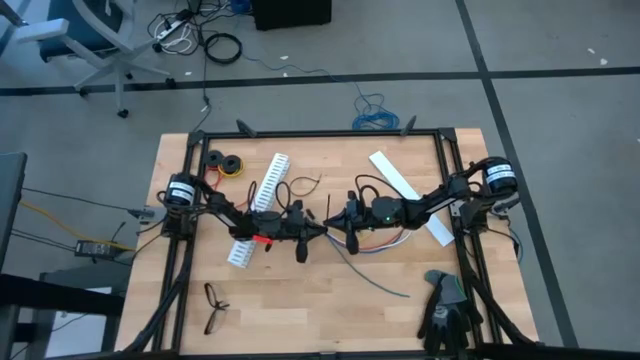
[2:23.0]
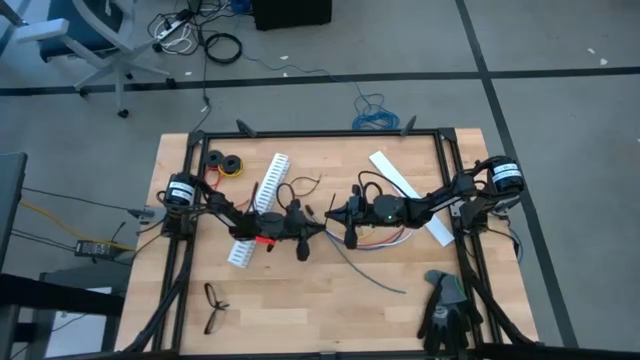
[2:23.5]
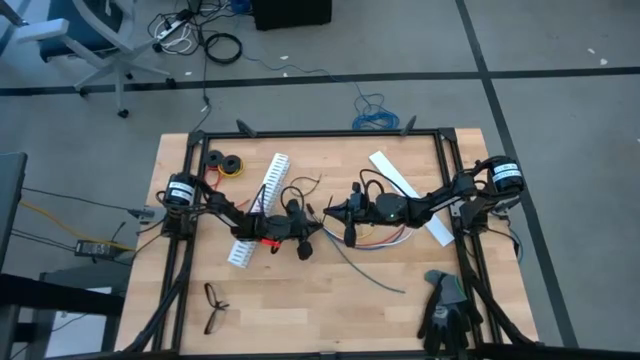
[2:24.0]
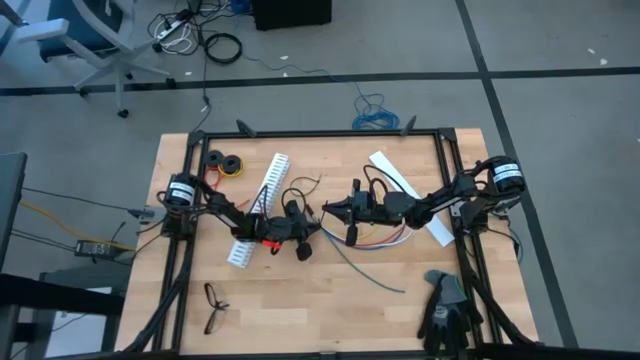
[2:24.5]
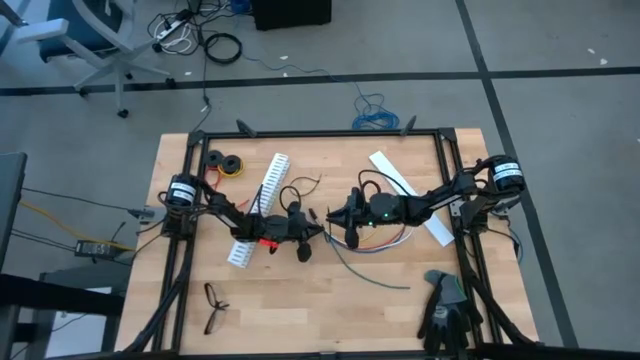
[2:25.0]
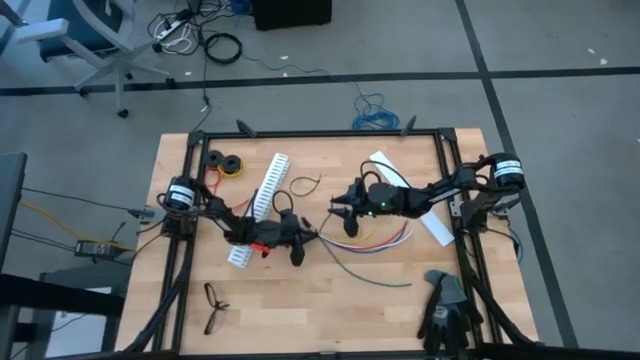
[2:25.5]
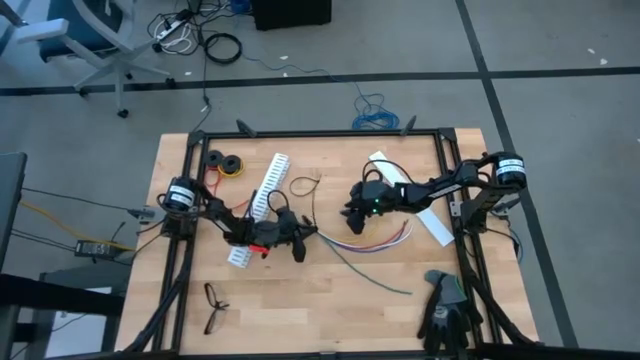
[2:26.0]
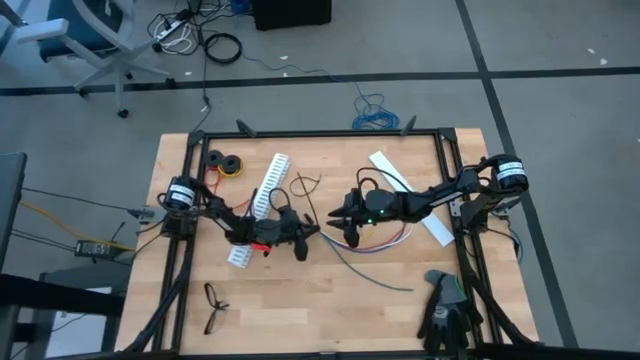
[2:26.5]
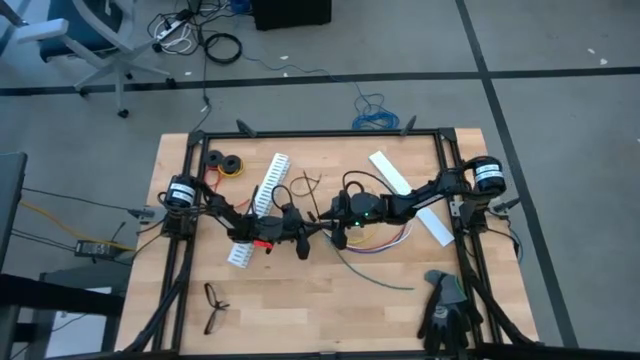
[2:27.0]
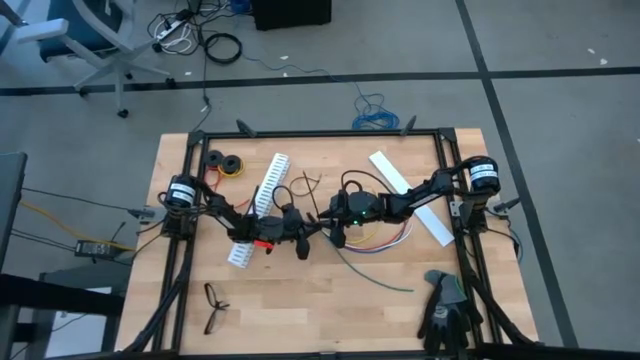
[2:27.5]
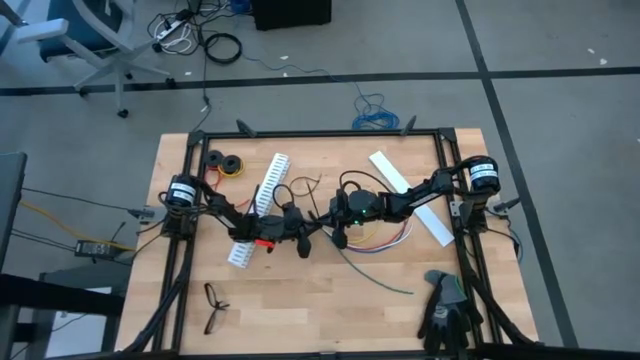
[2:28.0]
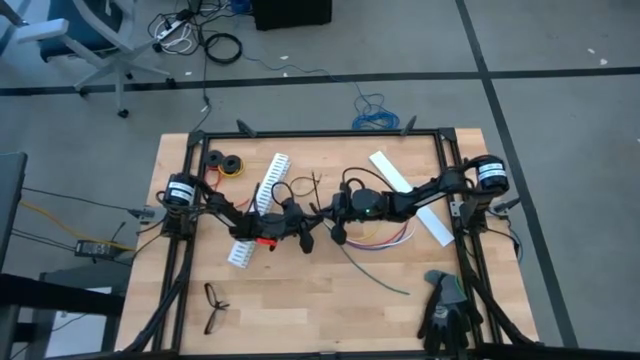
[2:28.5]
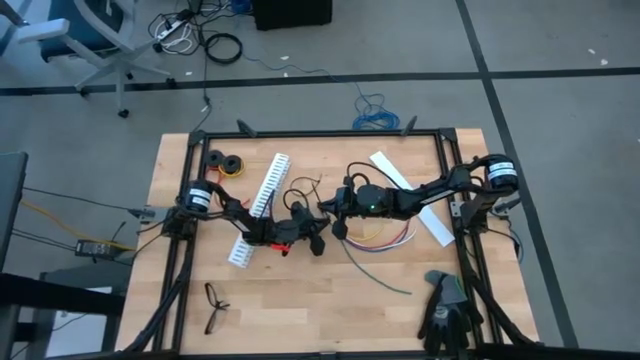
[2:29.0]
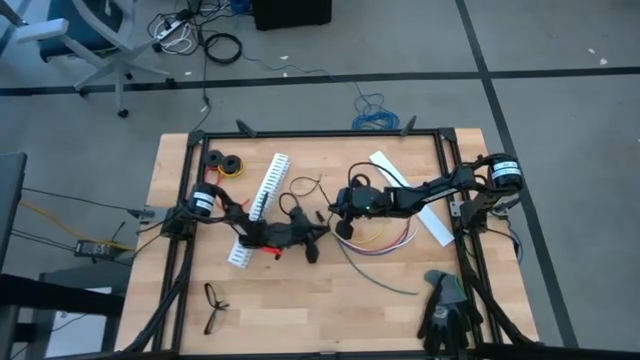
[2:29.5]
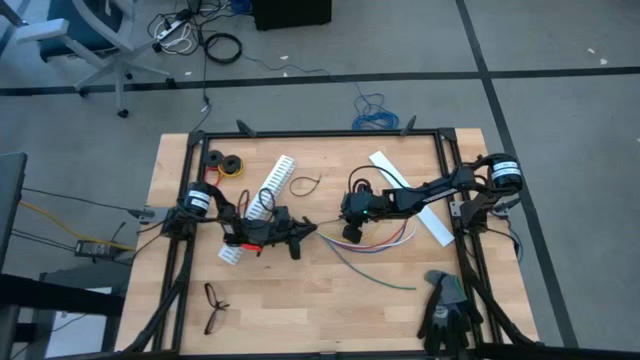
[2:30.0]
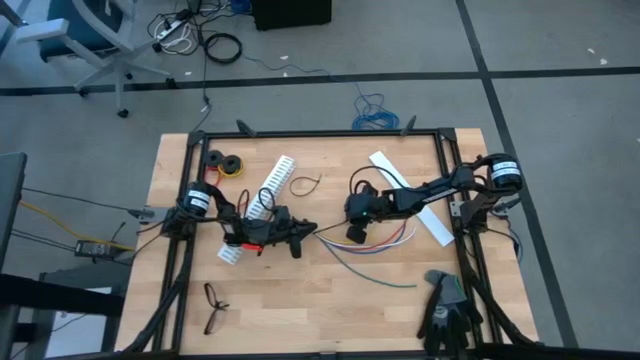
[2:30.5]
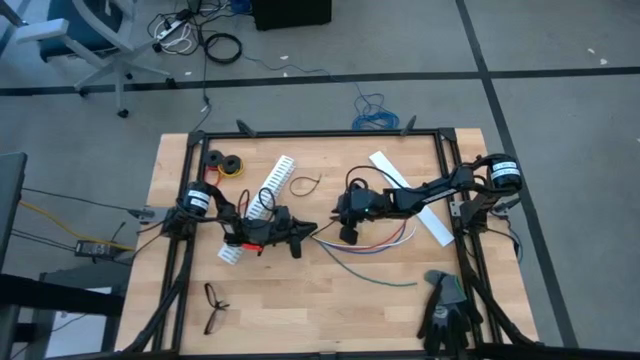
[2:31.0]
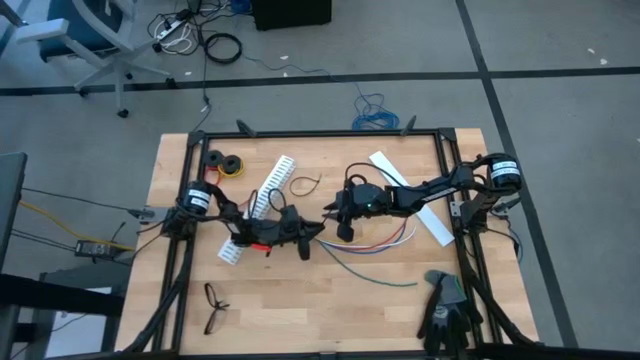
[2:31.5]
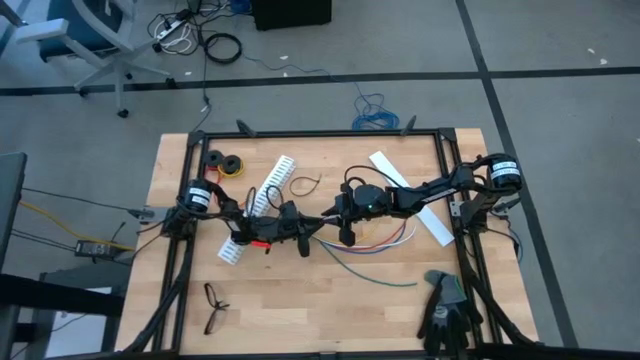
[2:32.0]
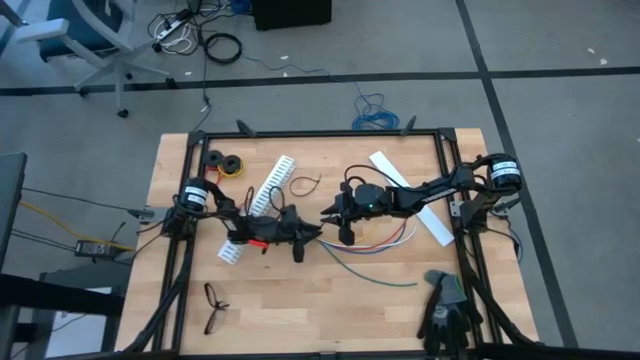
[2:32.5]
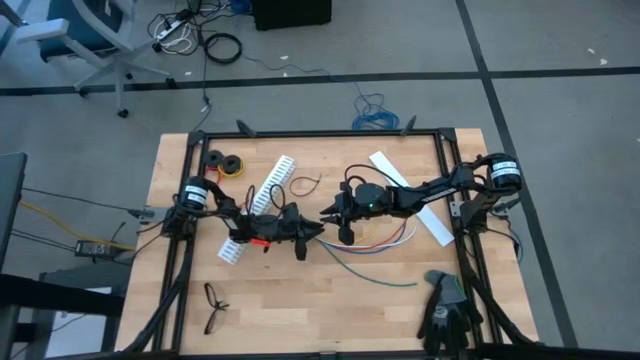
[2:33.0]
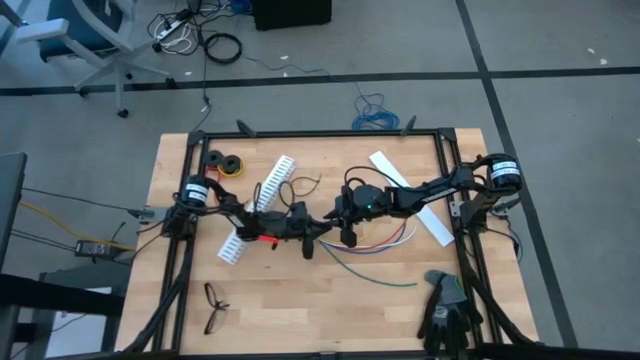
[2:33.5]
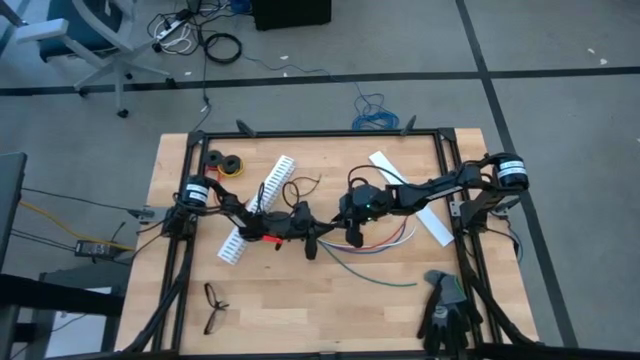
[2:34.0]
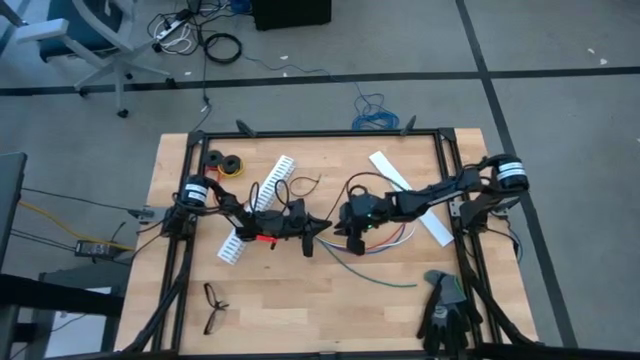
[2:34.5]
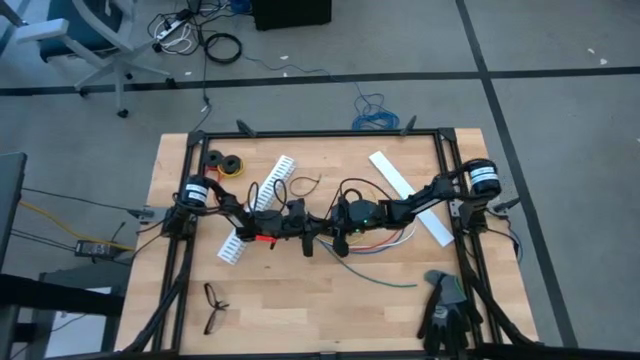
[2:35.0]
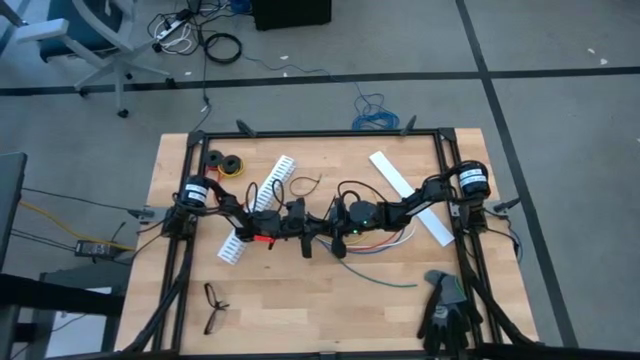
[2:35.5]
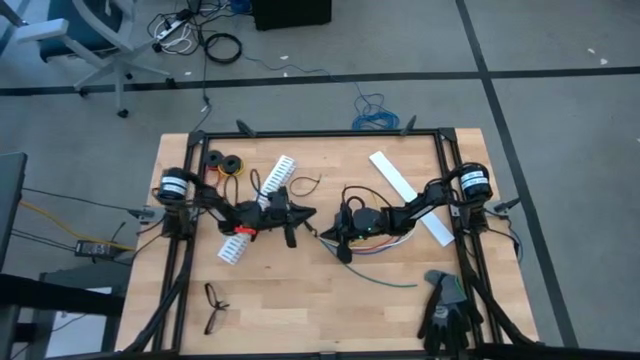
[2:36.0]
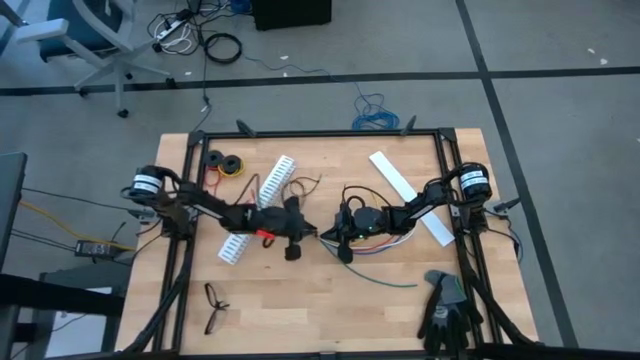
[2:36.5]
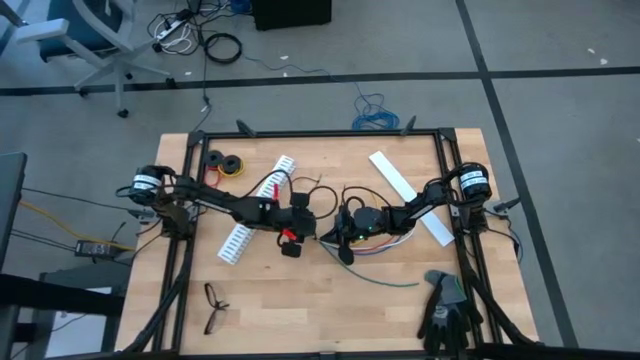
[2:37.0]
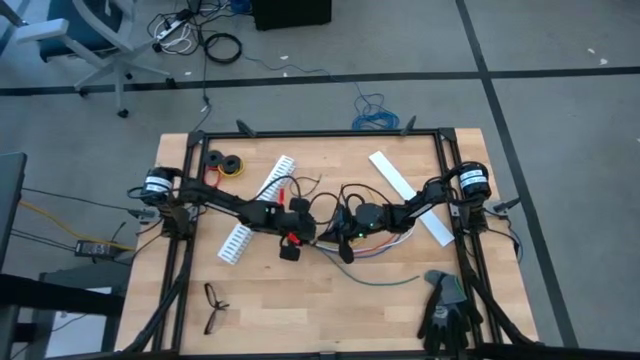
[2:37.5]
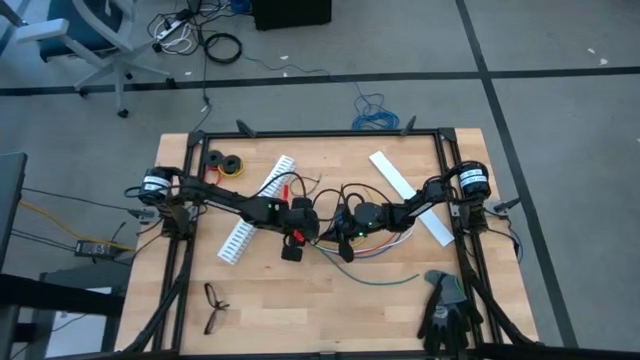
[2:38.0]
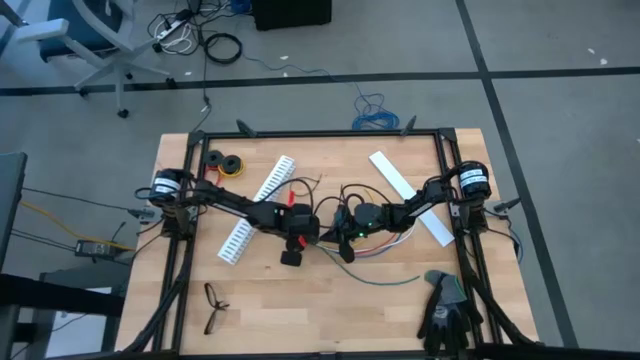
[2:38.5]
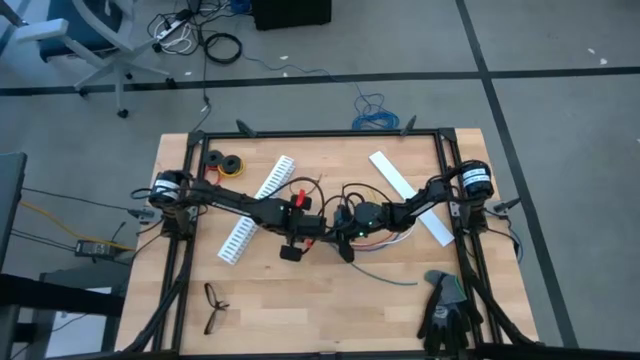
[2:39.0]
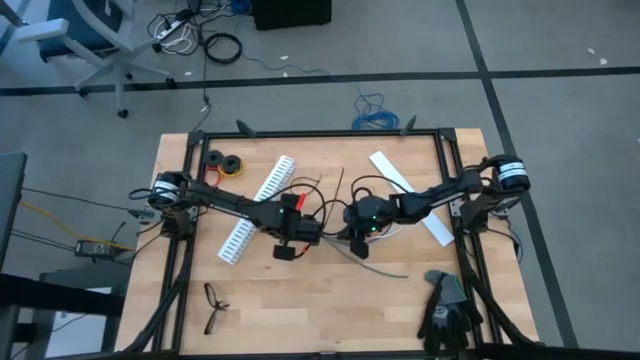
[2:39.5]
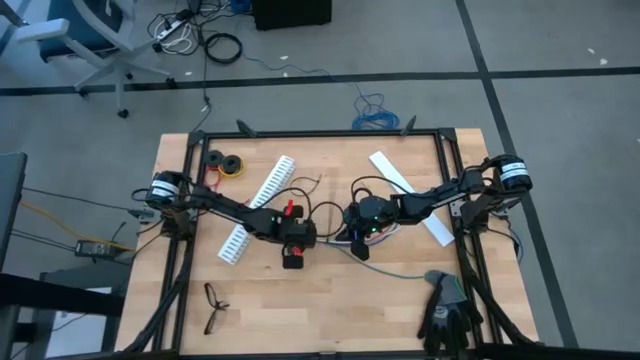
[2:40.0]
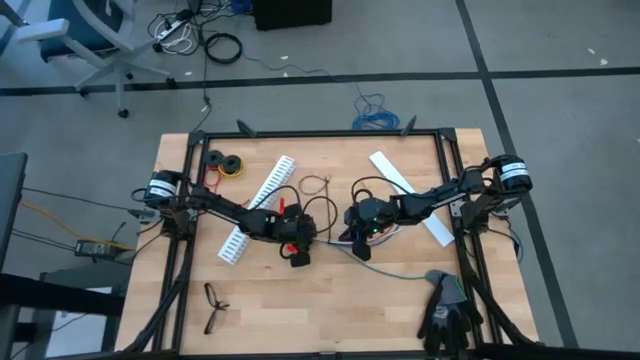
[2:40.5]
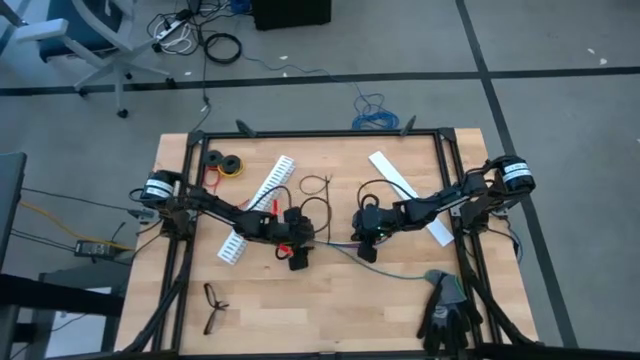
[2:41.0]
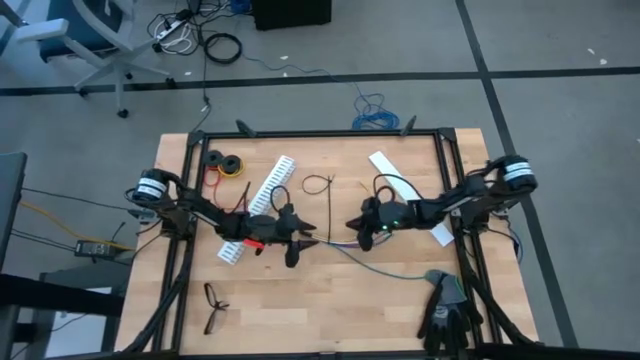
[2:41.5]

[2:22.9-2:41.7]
Task: Ziptie cables
Wrap the cable wires with the black zip tie

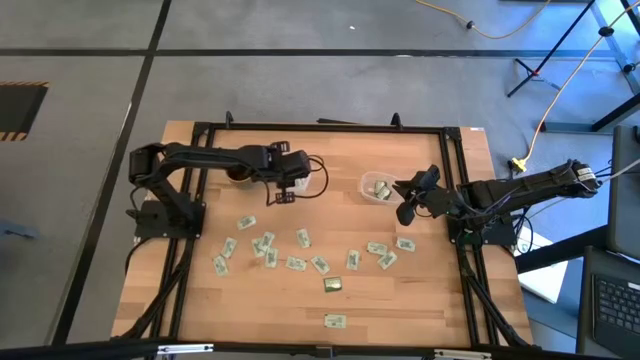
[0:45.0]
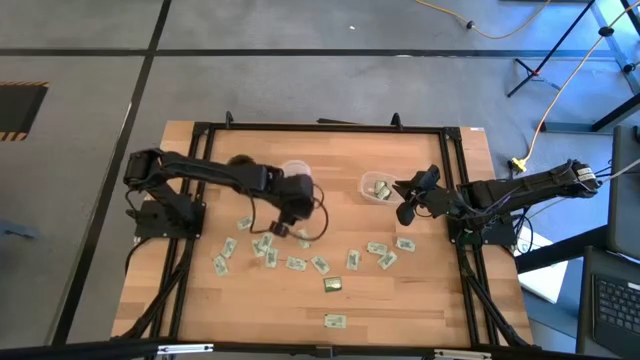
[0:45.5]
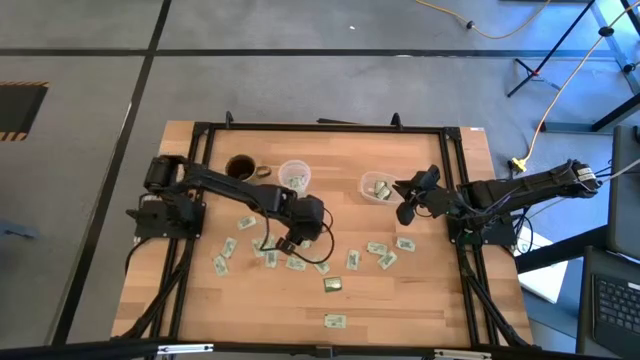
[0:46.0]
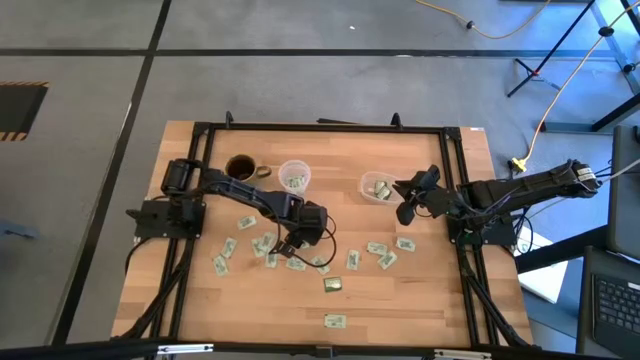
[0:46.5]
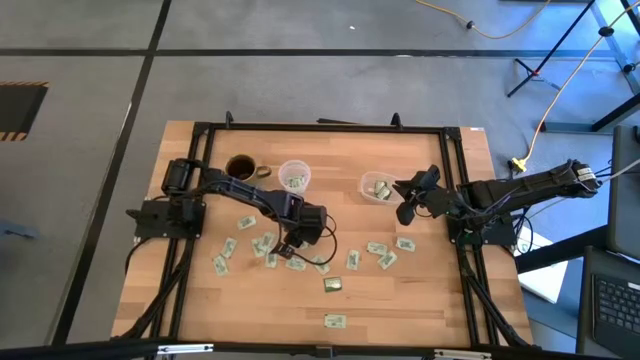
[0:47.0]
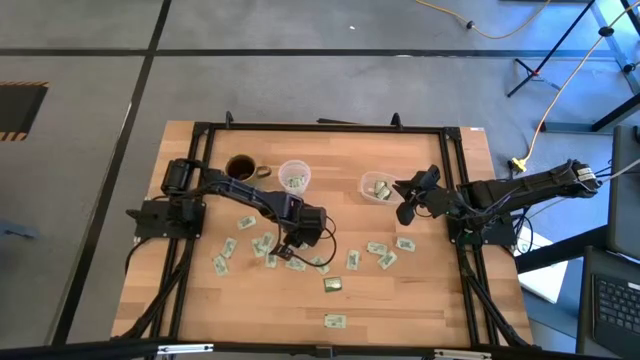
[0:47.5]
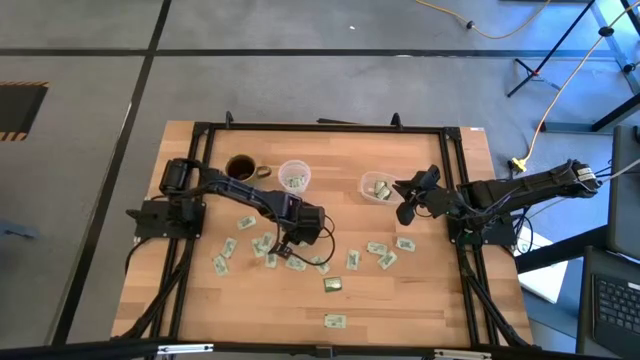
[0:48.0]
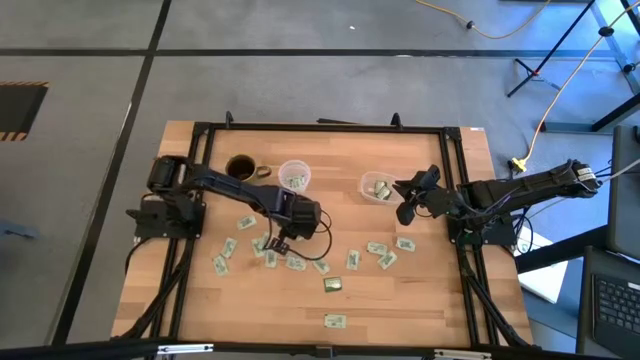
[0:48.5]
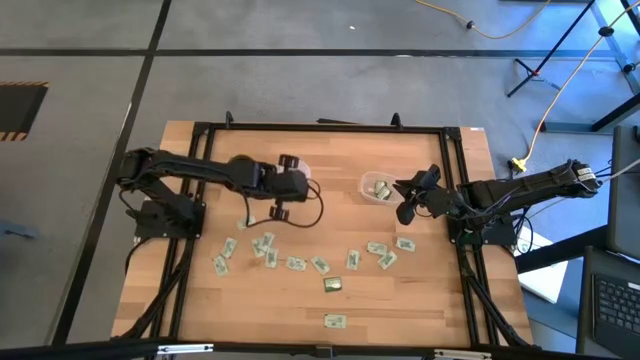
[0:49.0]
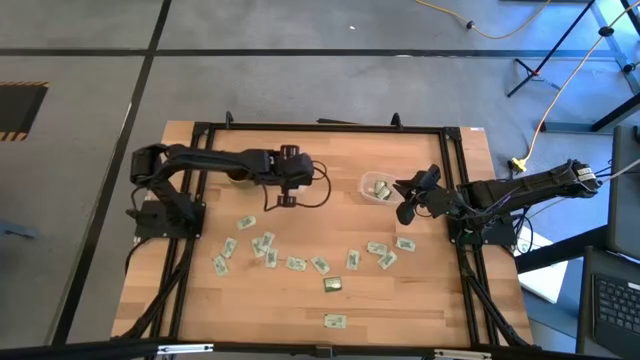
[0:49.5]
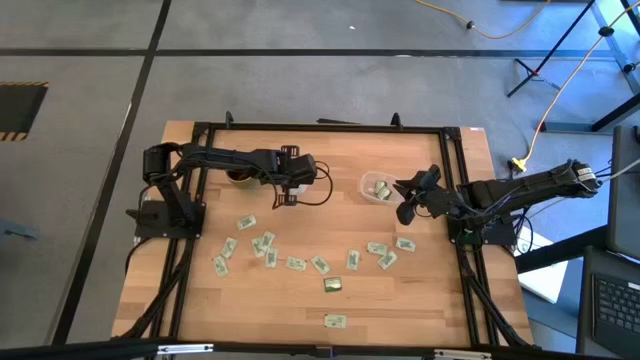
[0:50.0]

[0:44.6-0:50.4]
Task: Pick and place items into bin
Put the white stevia packet into the left transparent bin
